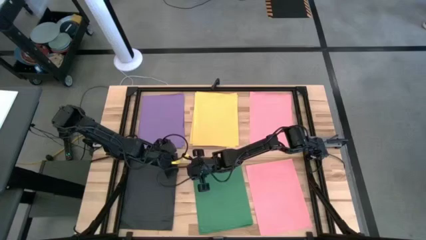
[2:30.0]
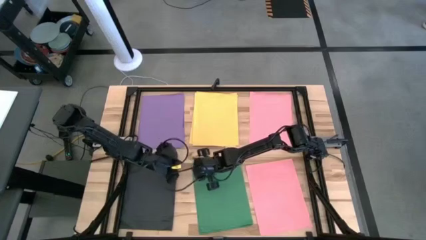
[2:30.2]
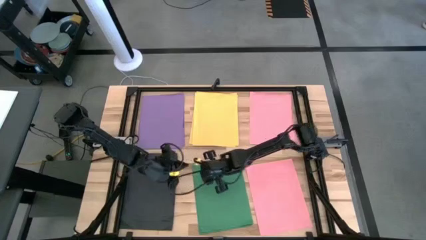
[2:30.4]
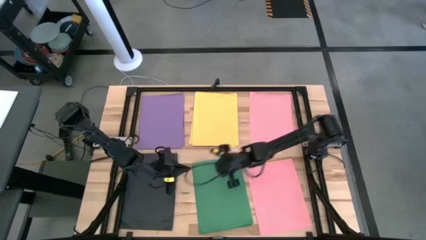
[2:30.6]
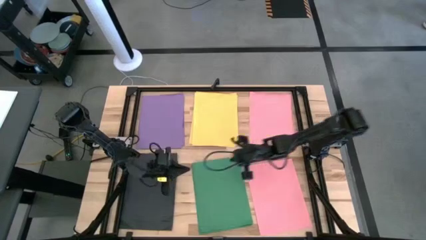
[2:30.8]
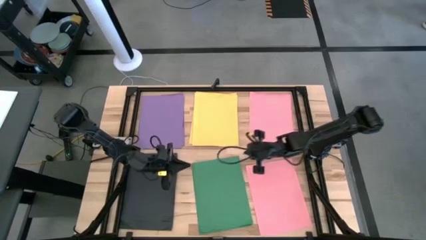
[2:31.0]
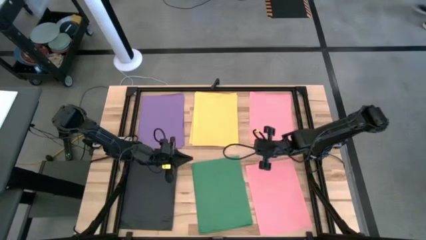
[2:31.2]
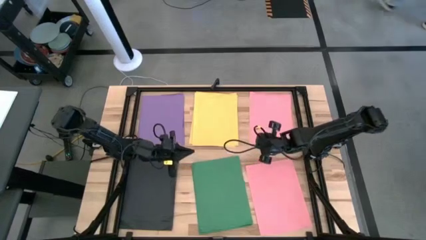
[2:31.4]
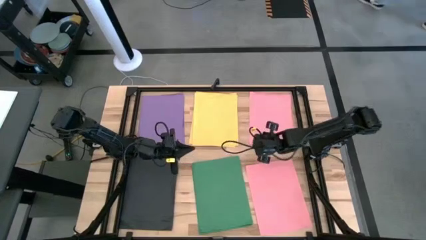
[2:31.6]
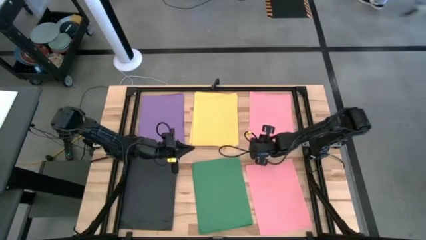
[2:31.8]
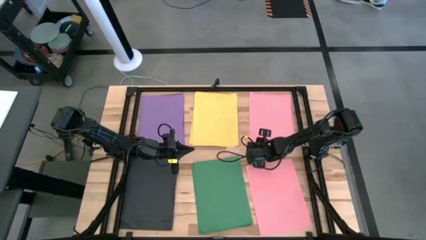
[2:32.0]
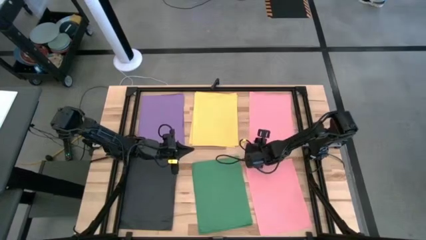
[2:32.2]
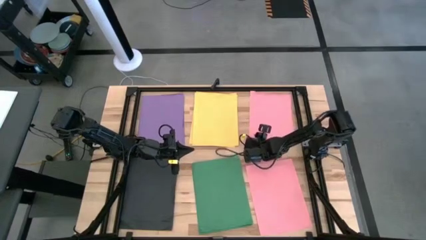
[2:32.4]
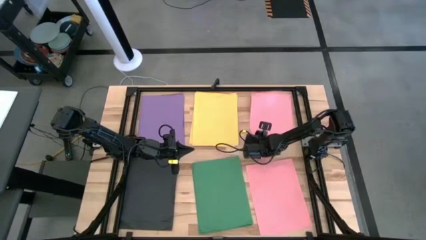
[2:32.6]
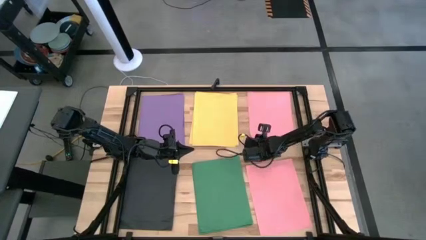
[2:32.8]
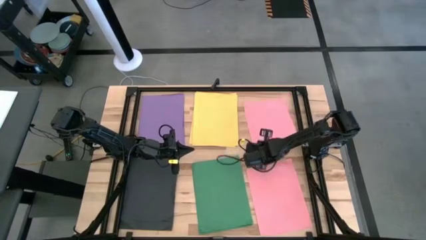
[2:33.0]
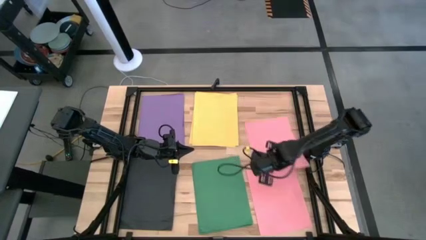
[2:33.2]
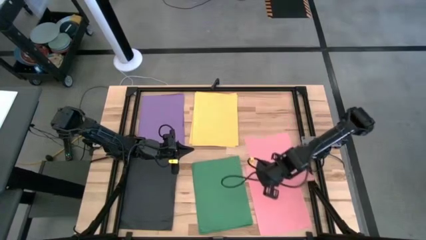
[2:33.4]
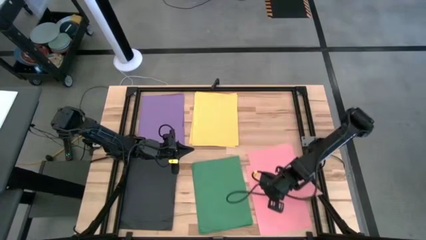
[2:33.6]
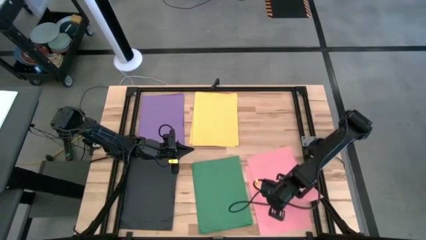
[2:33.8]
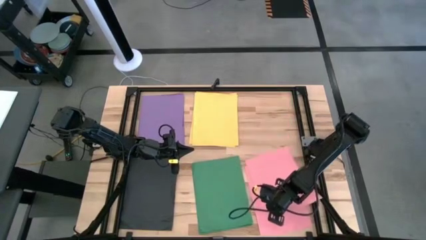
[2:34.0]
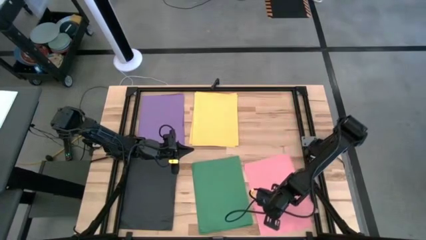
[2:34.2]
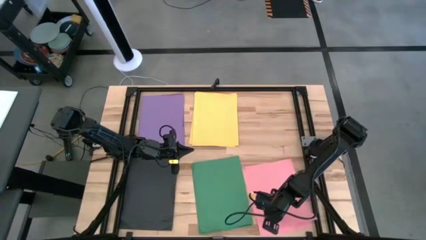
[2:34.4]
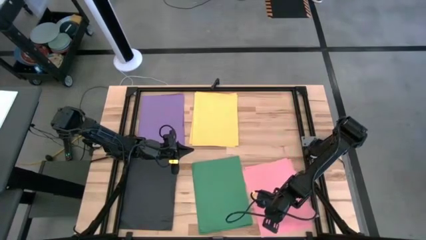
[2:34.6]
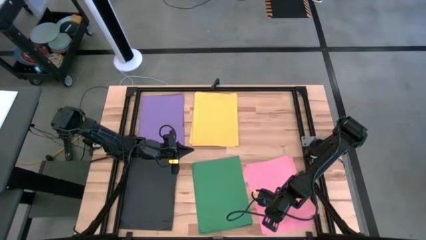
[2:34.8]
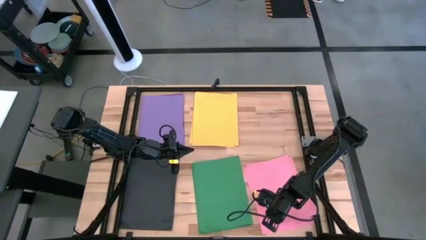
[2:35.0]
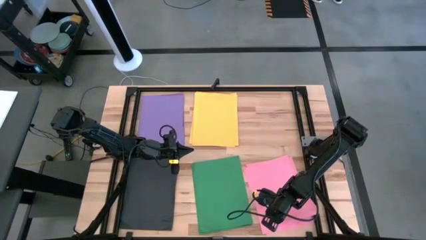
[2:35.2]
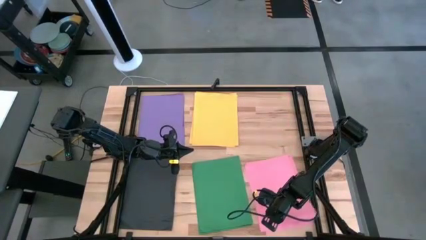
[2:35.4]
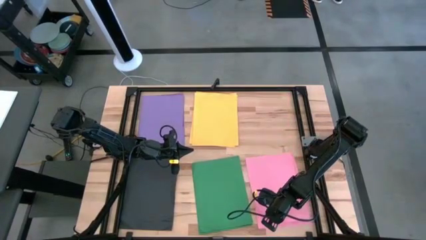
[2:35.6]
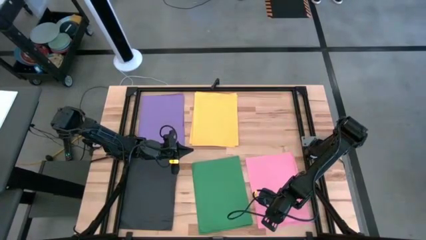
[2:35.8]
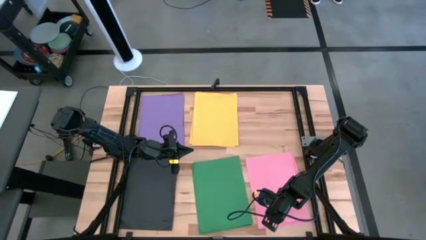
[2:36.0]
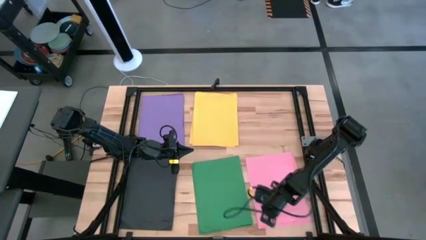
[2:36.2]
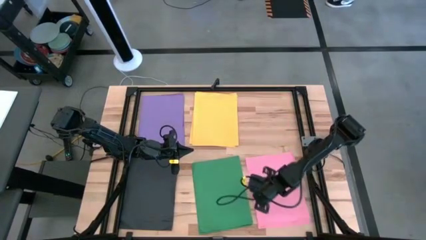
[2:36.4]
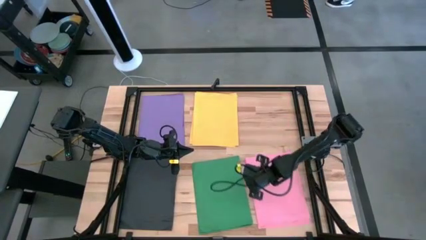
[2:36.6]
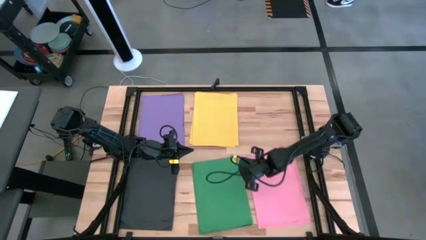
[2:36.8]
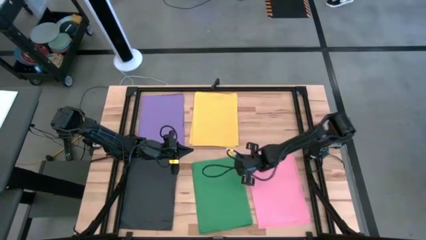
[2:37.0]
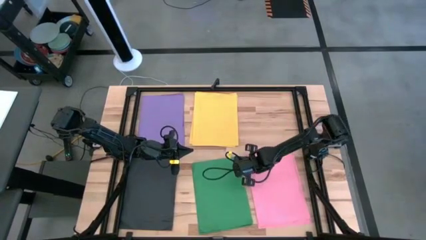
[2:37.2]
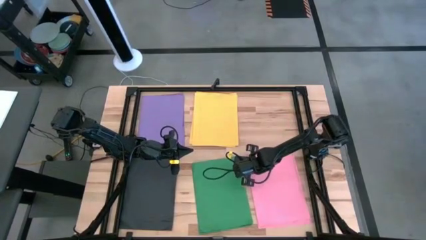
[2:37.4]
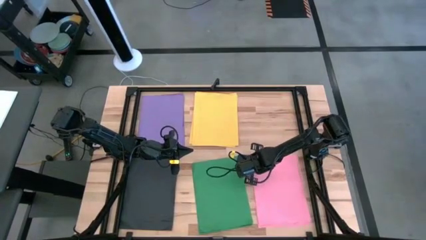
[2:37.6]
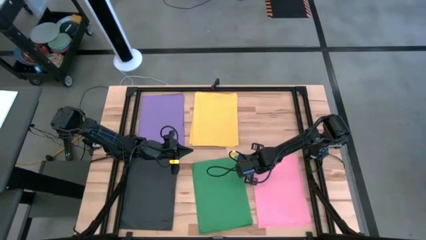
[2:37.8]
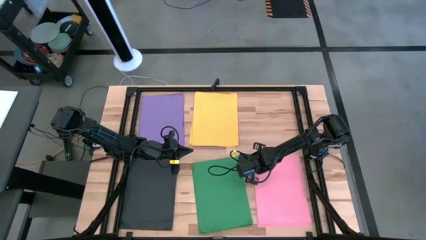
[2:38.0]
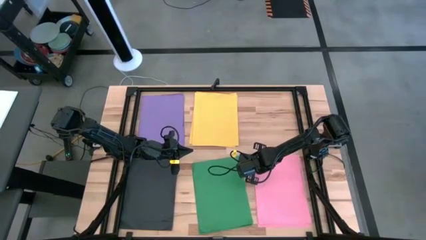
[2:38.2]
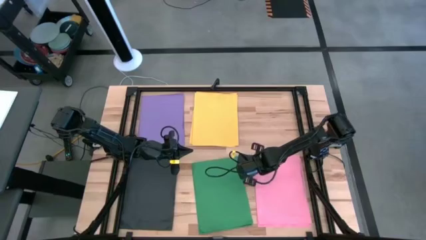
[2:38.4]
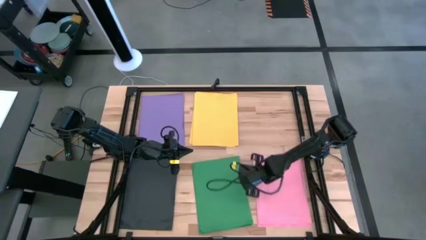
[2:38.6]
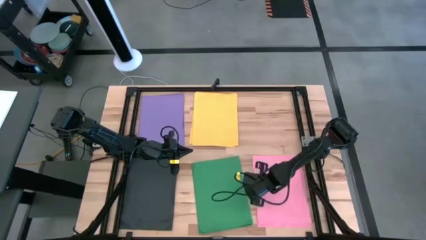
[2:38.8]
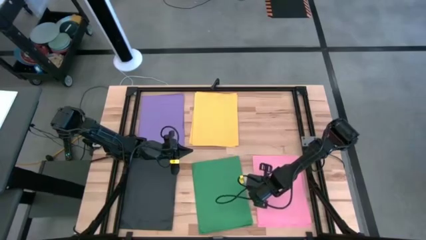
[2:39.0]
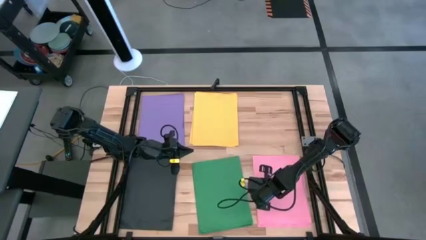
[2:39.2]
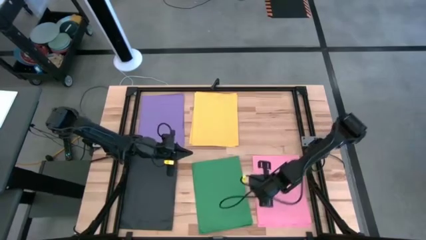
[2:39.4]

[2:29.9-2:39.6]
Task: Organize paper
Stack the pink paper on top of the pink paper

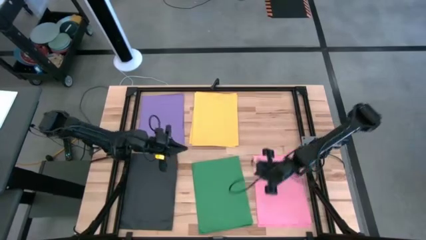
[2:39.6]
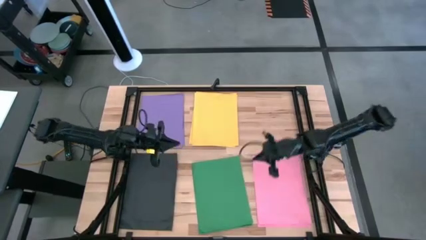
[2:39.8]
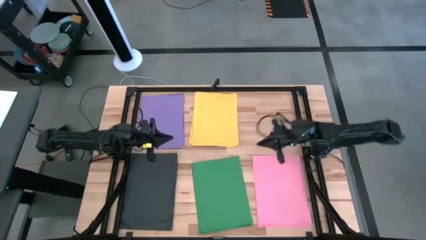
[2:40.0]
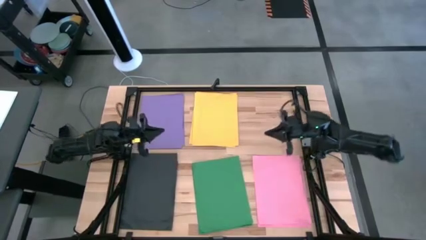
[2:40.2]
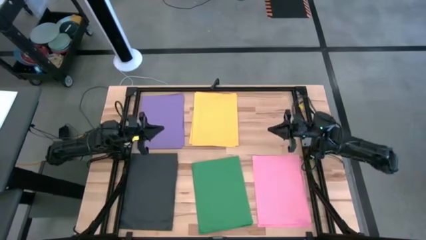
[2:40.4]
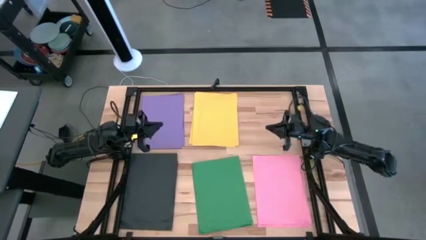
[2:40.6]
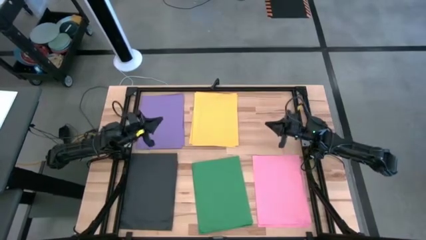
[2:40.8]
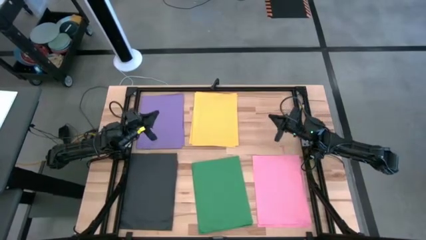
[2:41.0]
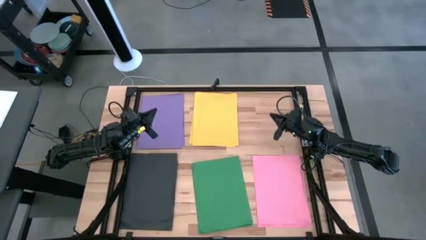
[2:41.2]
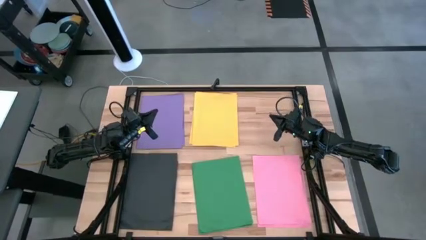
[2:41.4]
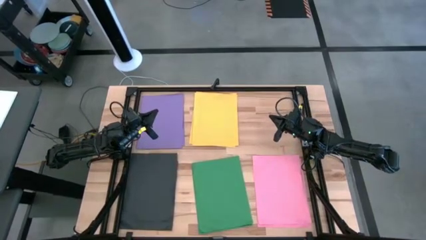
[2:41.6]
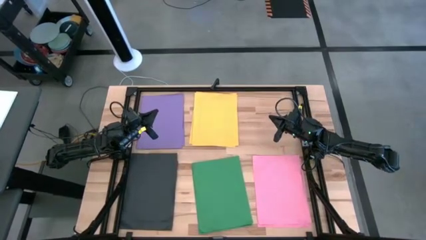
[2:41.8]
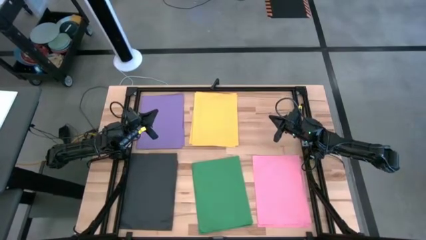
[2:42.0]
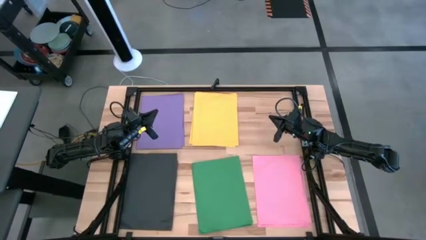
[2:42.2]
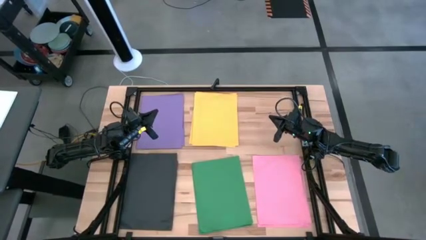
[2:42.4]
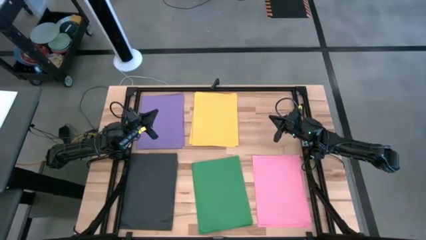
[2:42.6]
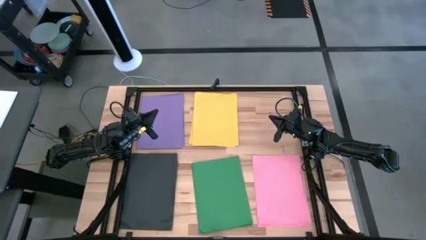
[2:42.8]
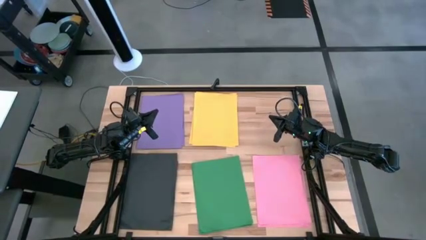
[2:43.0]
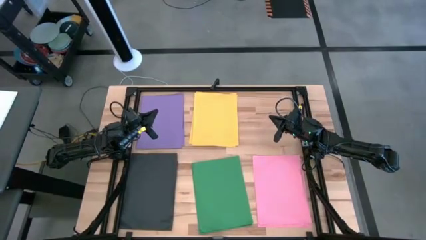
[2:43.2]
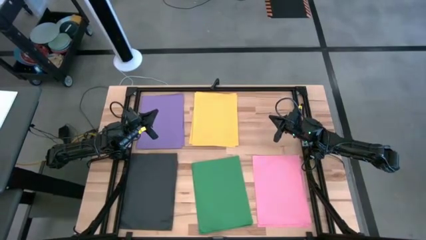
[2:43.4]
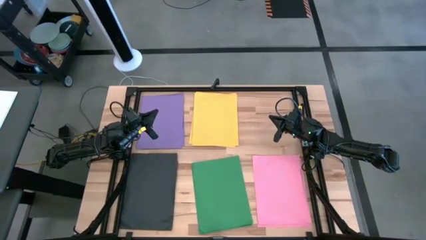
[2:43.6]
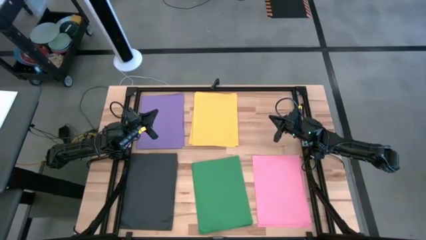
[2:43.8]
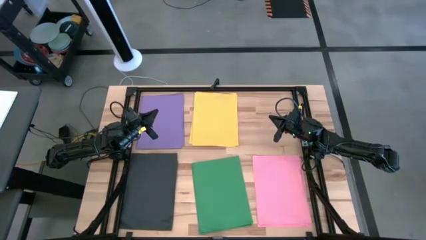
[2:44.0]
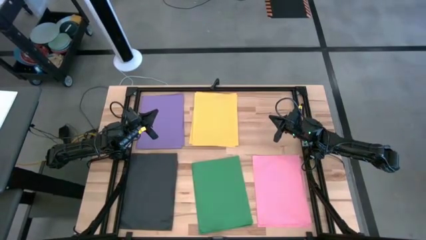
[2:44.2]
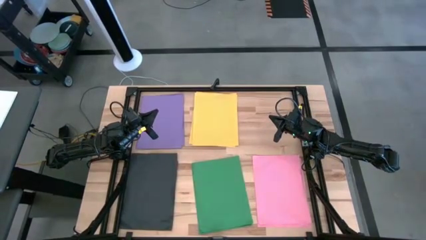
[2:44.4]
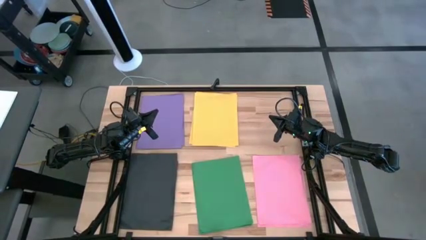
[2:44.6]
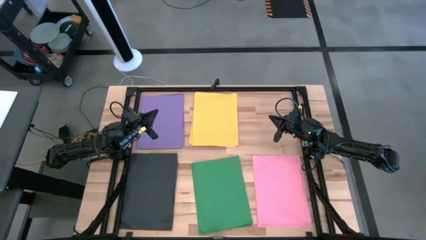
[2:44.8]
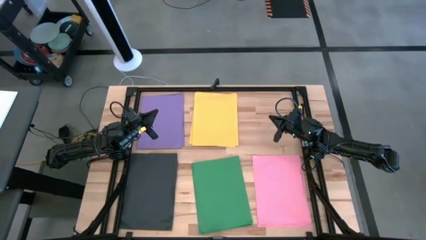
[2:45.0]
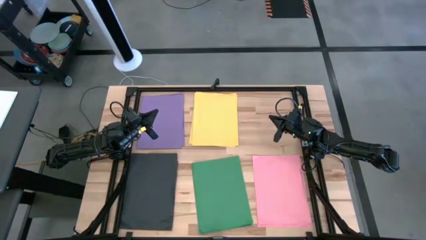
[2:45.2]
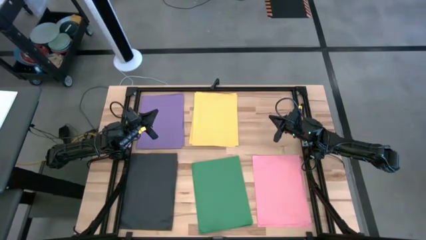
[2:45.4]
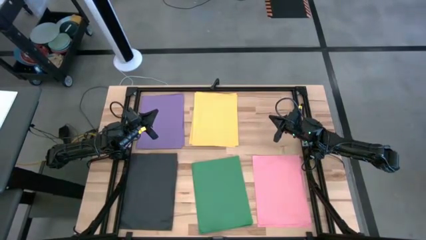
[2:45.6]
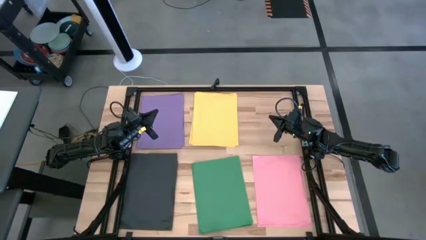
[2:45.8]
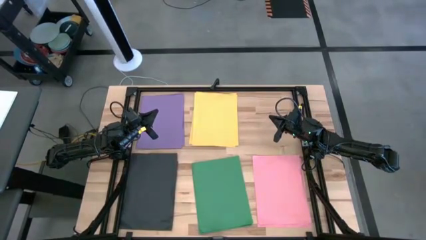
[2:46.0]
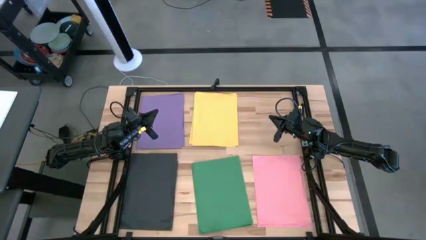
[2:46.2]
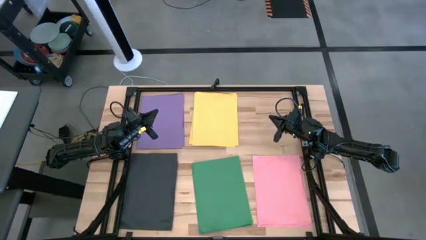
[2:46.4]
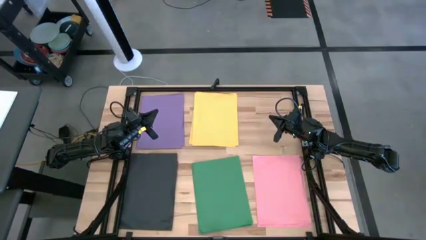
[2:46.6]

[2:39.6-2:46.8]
Return to Home Position
